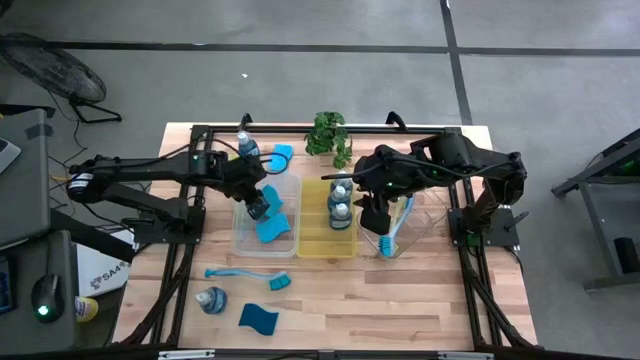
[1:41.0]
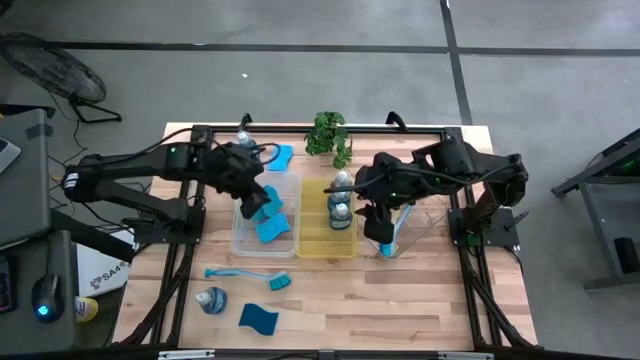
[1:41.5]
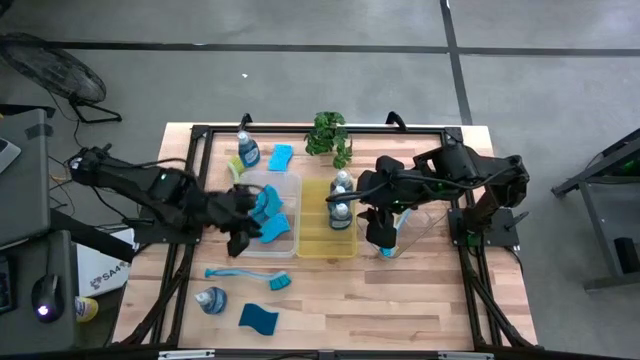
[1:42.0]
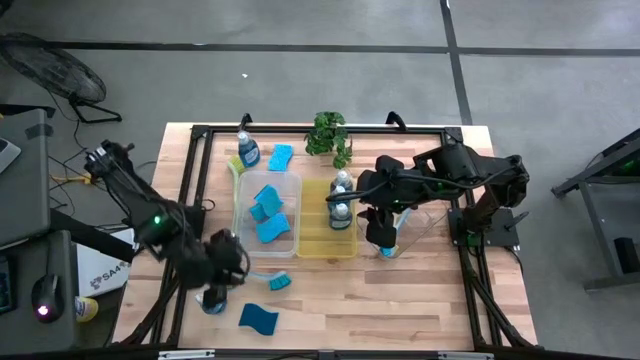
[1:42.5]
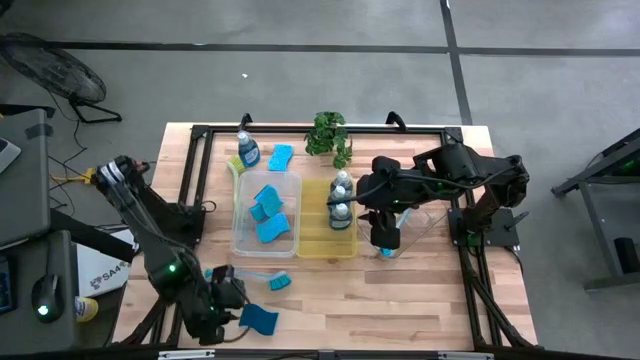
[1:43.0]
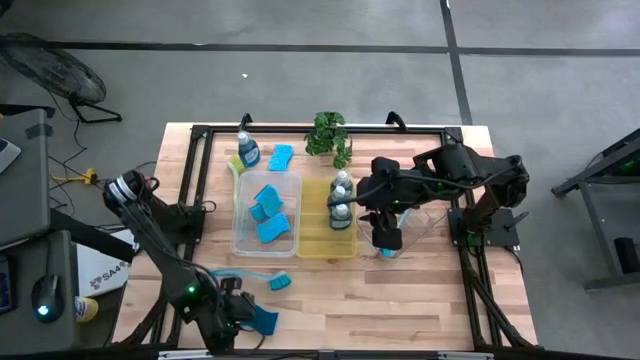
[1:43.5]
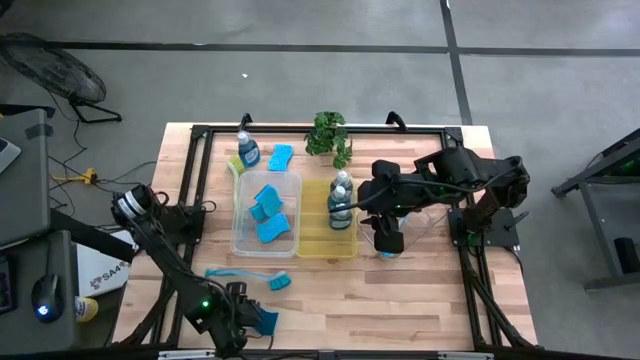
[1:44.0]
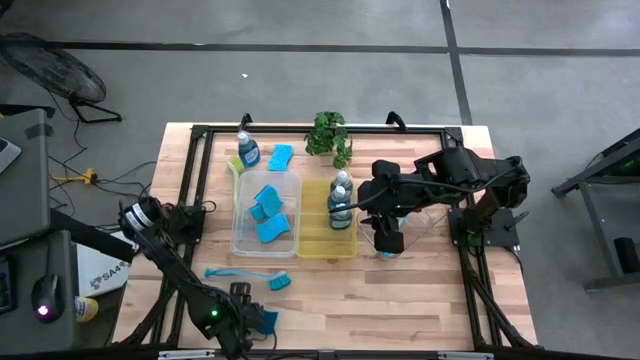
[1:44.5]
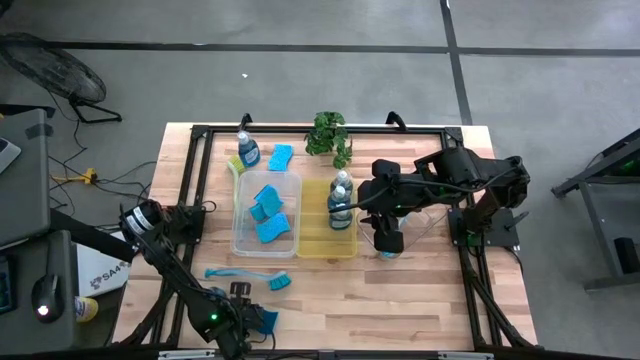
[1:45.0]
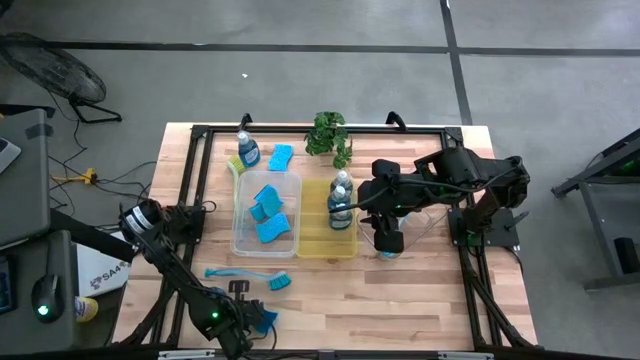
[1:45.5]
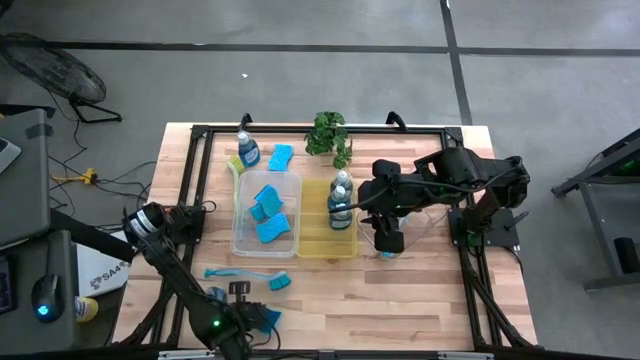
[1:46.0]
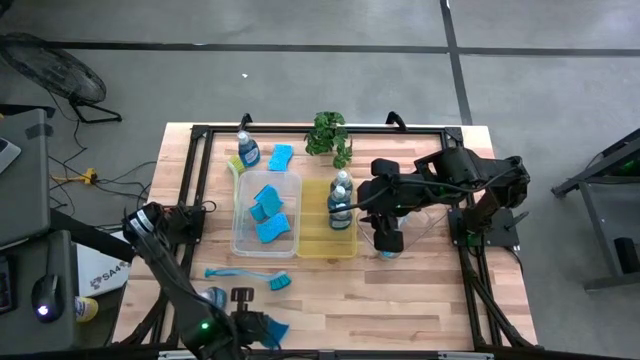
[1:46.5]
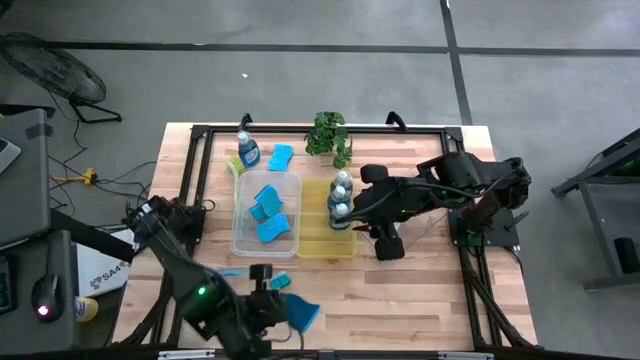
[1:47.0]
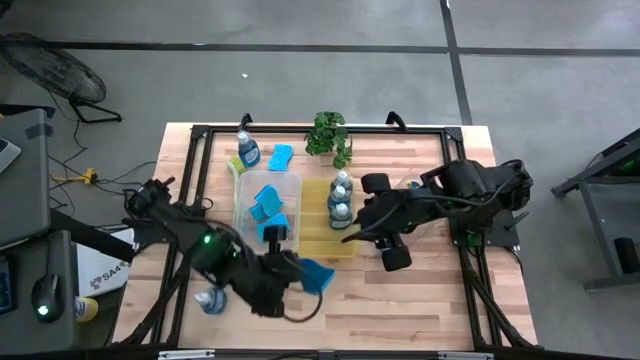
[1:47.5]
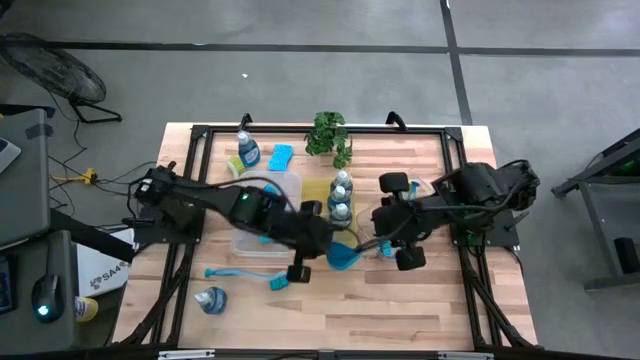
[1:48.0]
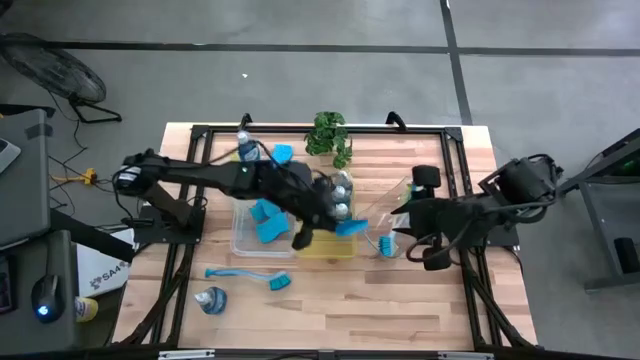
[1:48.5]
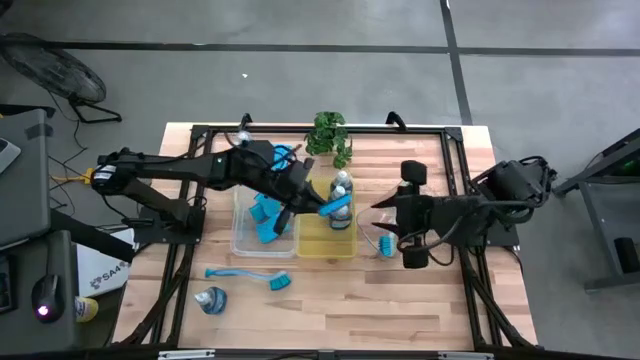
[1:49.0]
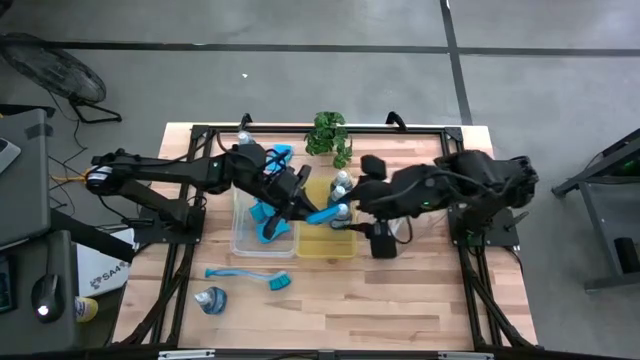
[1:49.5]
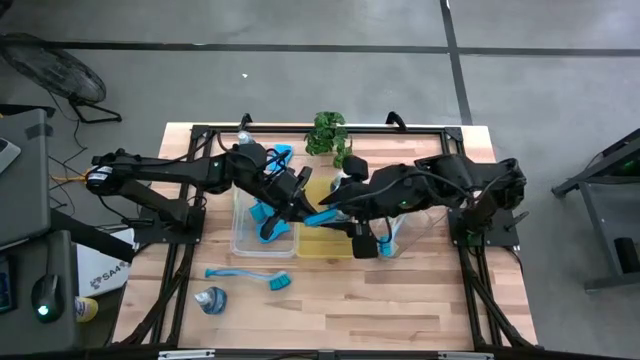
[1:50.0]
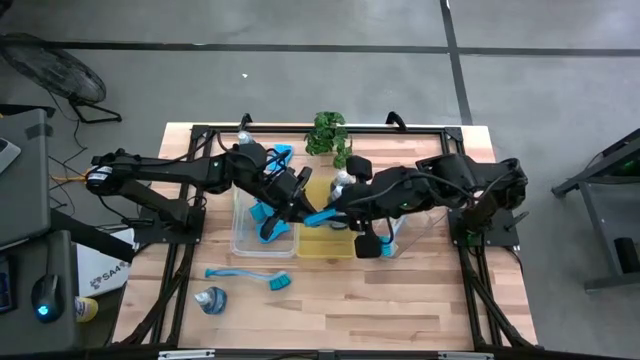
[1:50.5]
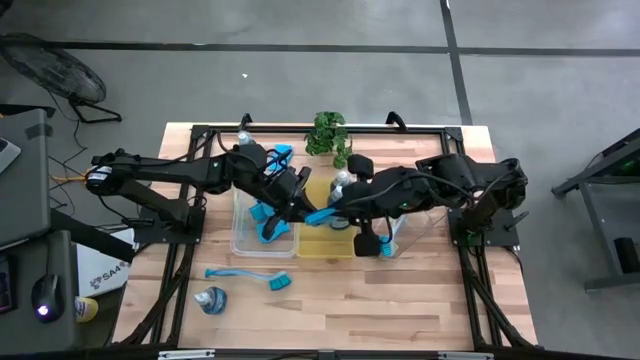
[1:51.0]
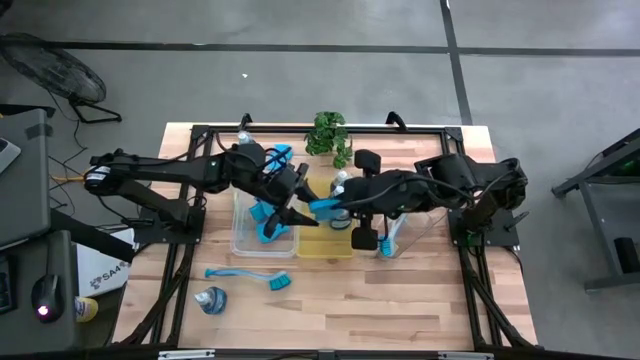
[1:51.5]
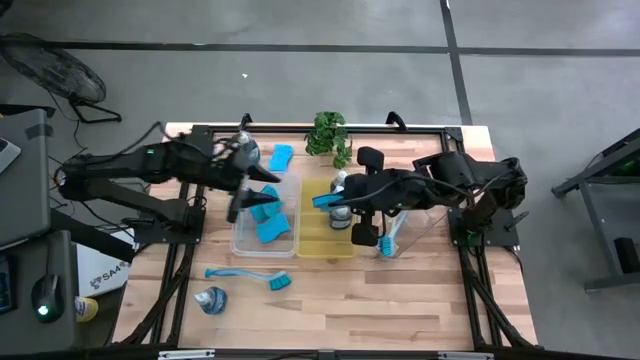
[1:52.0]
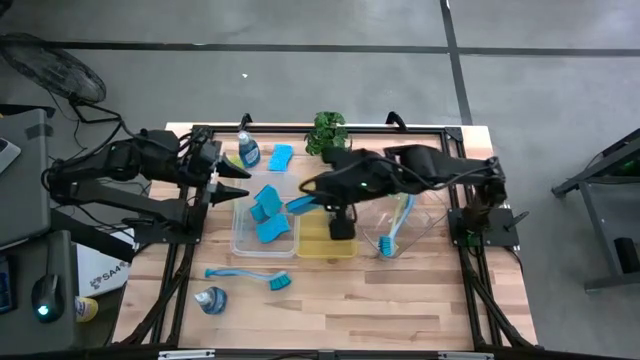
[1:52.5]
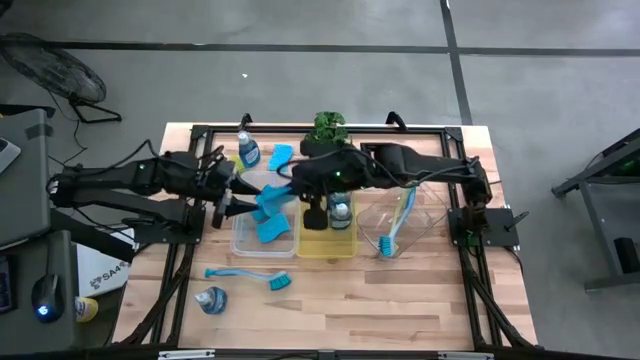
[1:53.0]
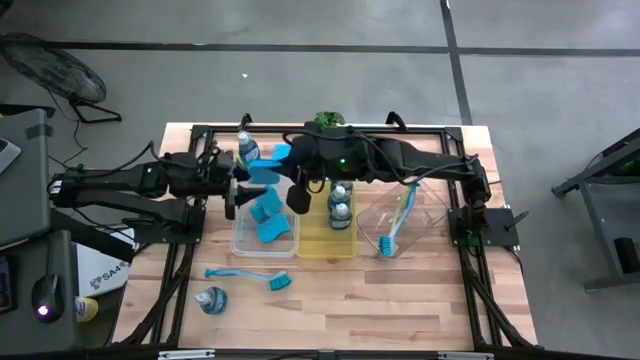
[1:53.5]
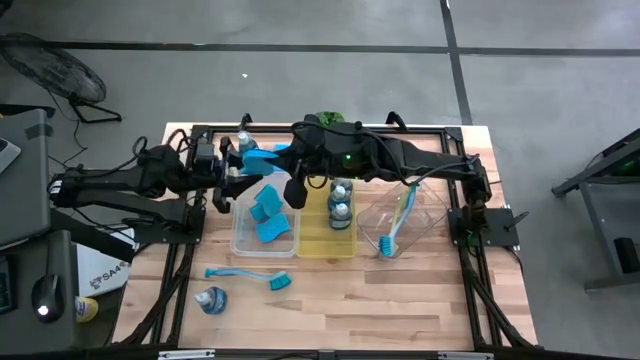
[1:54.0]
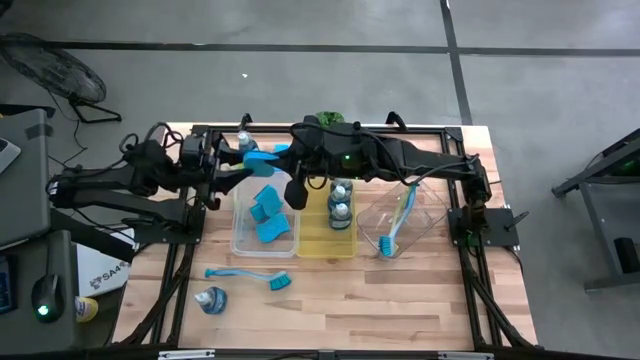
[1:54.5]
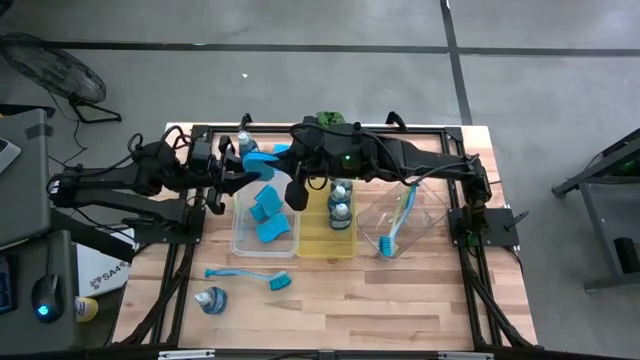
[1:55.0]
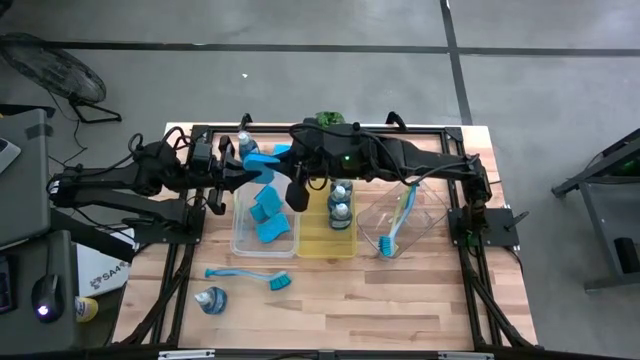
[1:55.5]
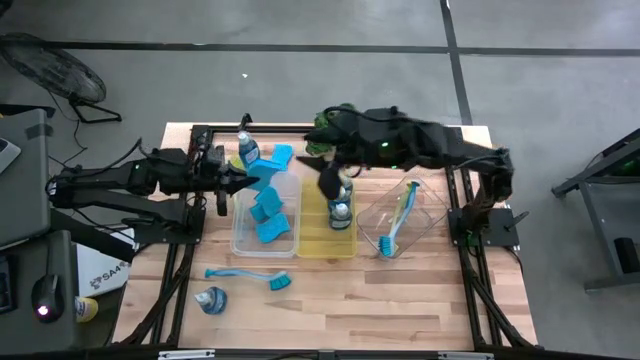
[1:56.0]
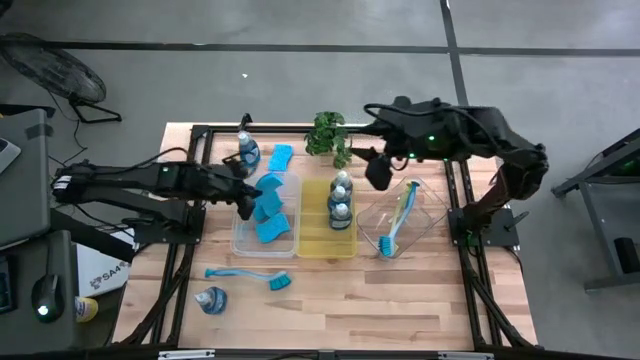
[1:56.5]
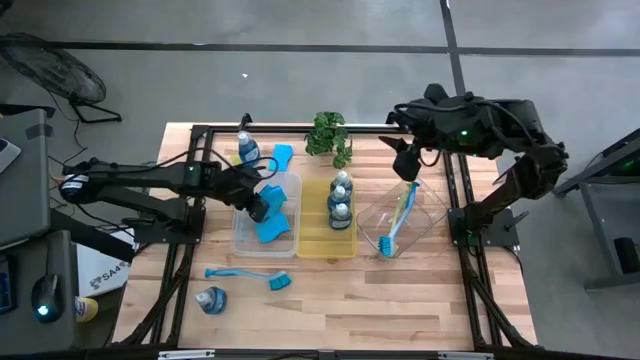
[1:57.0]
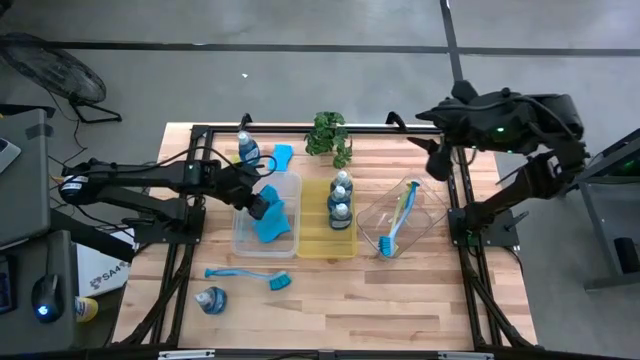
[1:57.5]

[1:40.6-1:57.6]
Task: Pick & Place Kitchen Sink Supplies
Put the blue sponge into the white bin

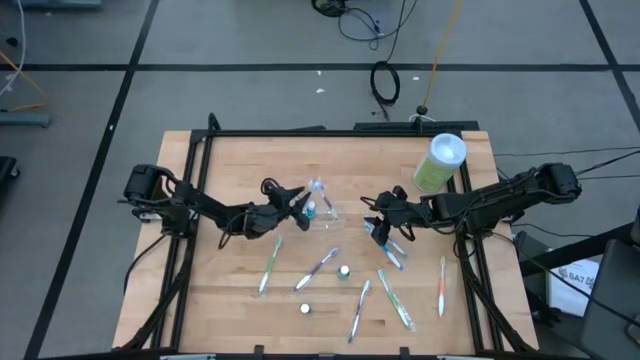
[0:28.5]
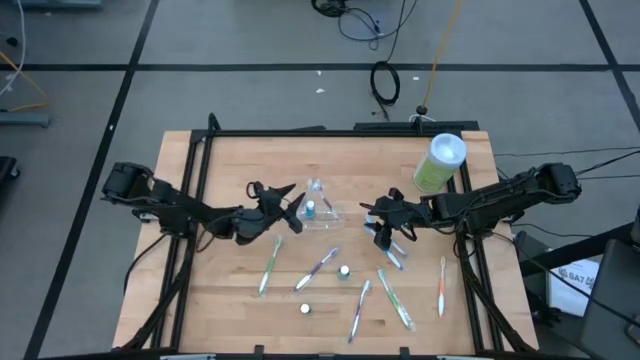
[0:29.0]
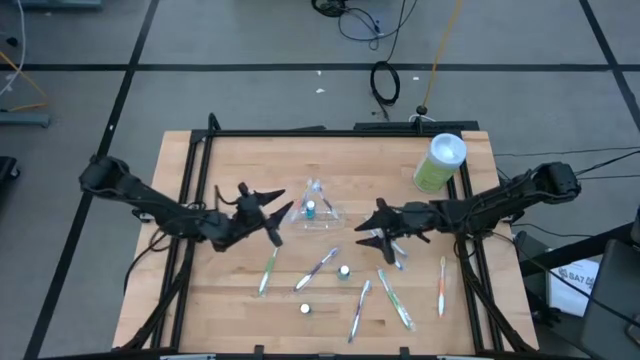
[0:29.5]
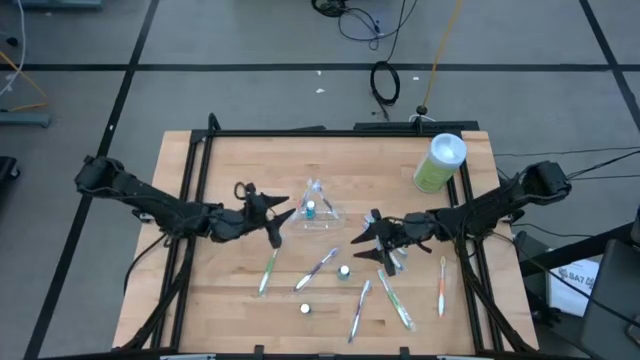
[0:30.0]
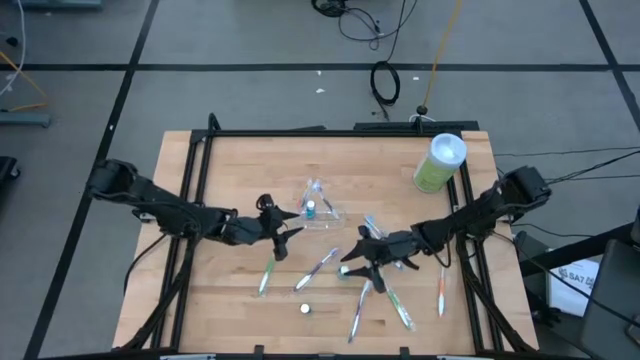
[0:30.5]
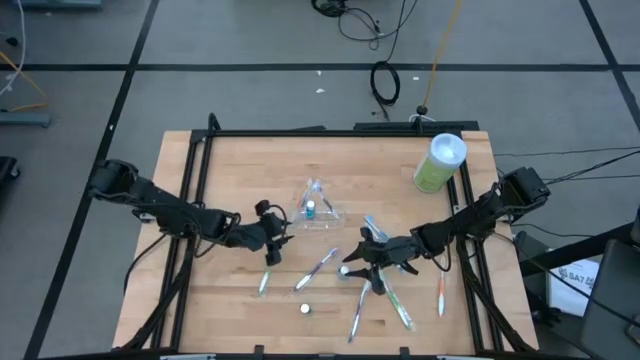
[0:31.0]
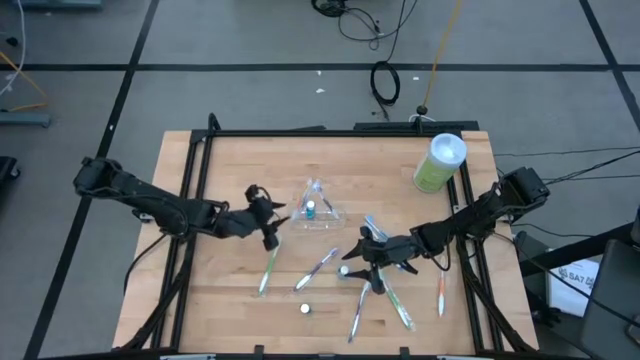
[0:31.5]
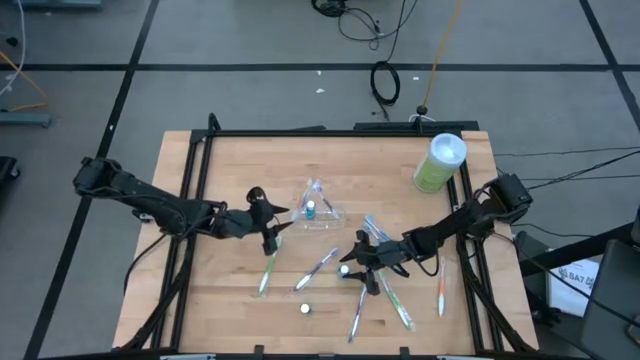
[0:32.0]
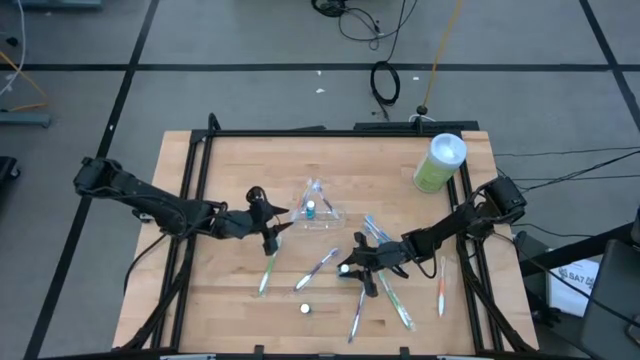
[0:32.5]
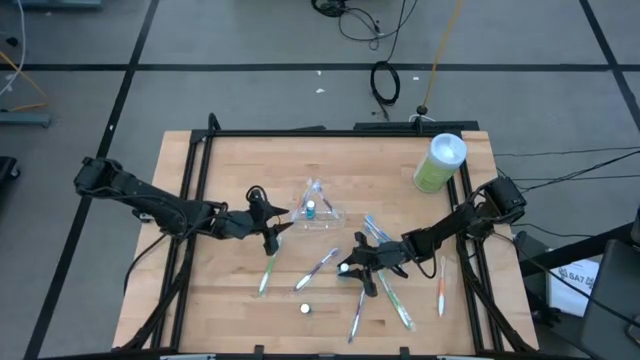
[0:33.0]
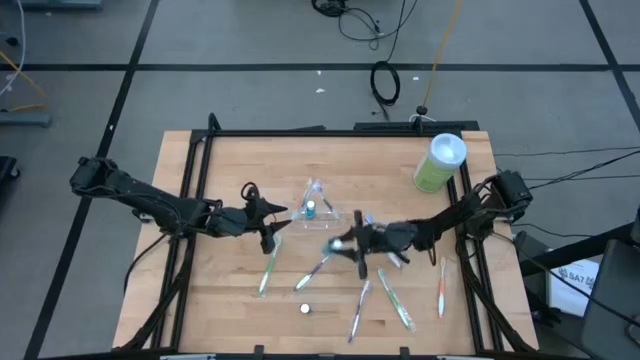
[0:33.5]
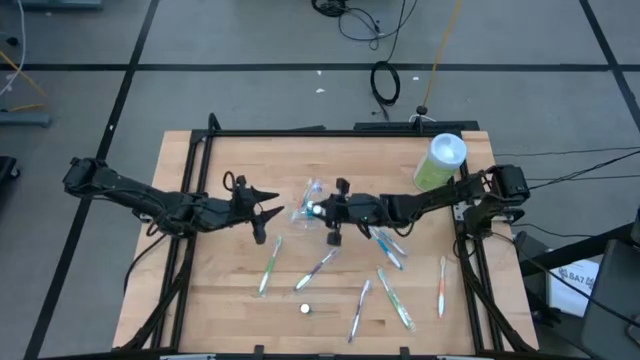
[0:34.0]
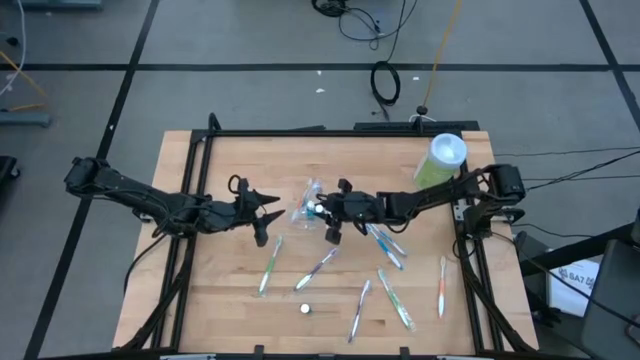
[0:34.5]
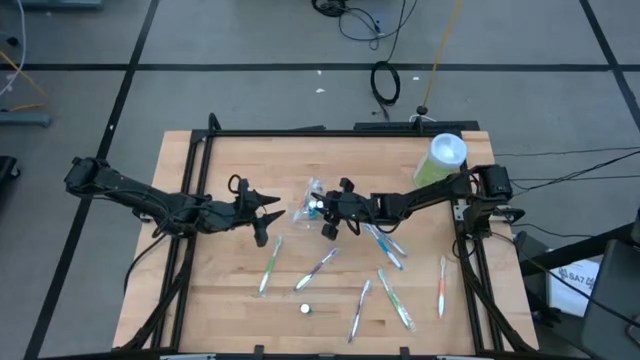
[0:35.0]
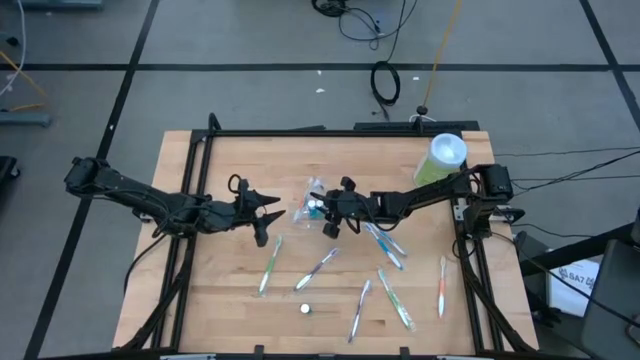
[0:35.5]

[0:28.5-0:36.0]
Task: Pick & Place toothbrushing station
Put the top blue mouthwash into the transparent organizer
